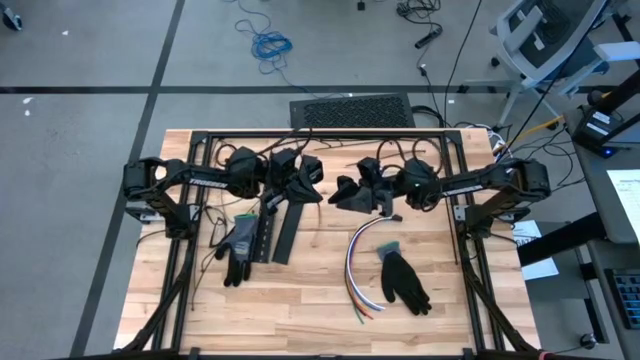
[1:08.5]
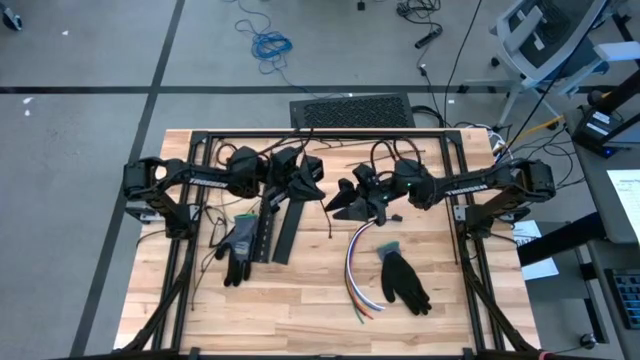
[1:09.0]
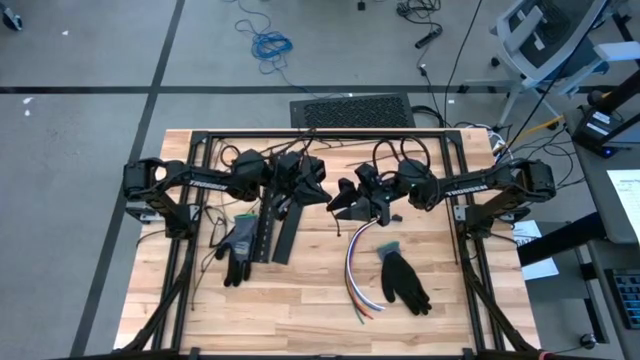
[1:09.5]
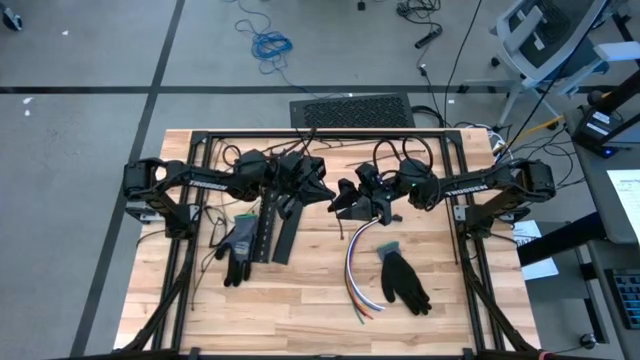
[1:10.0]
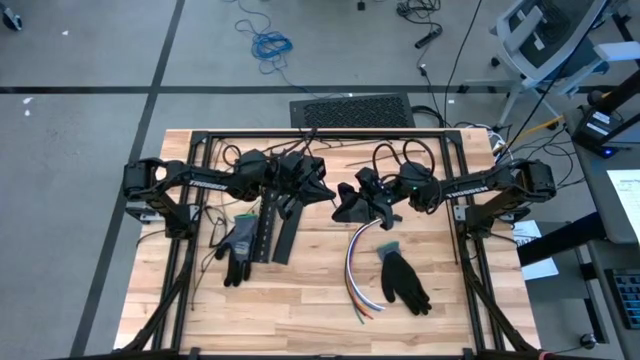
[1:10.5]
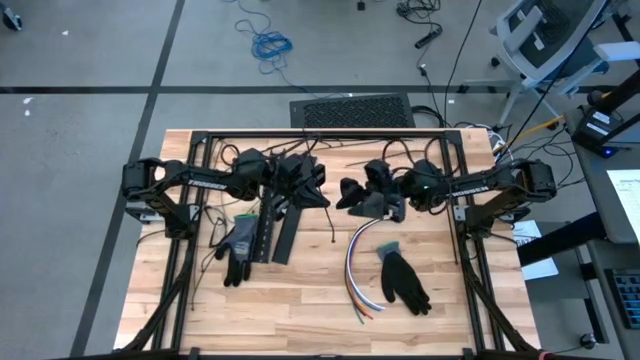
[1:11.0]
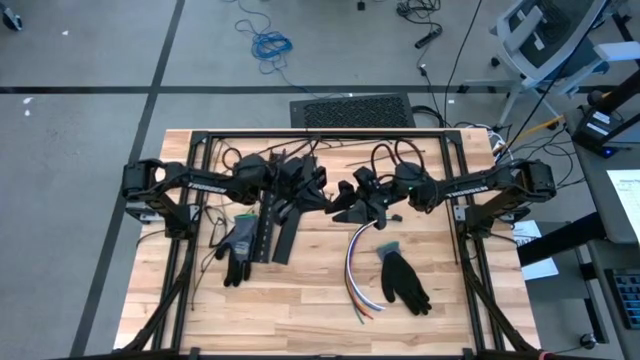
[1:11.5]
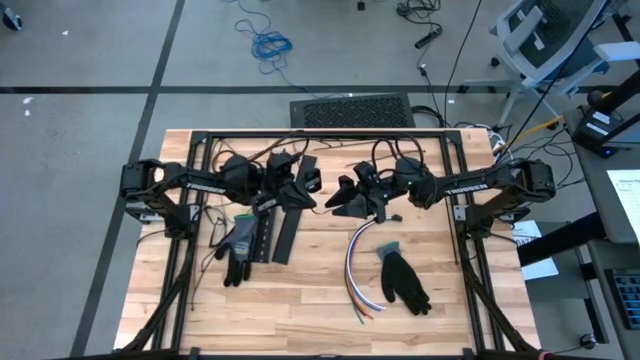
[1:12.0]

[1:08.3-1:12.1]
Task: Ziptie cables
Wrap the cable wires with the black ziptie

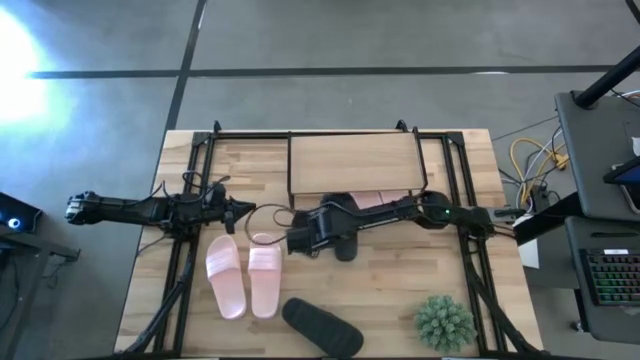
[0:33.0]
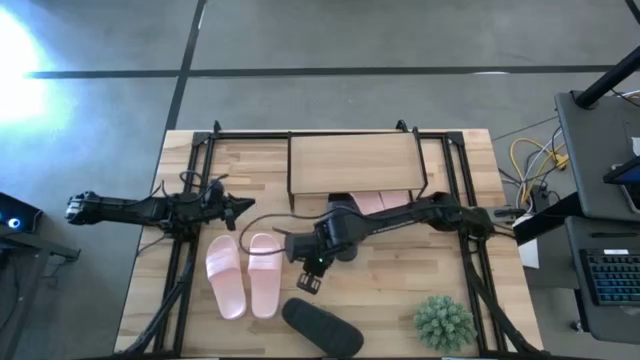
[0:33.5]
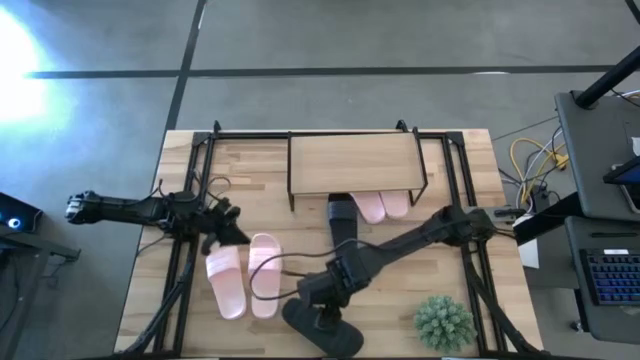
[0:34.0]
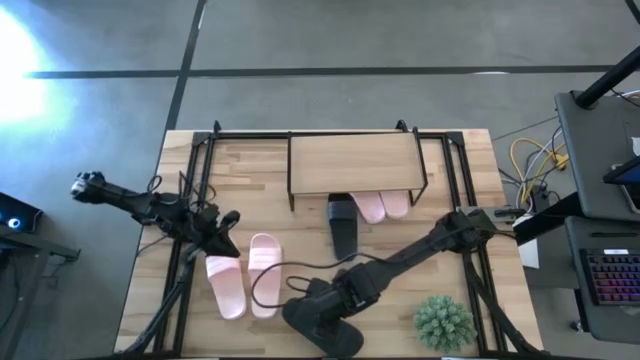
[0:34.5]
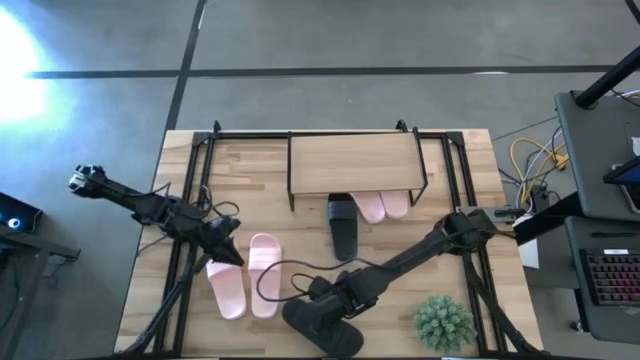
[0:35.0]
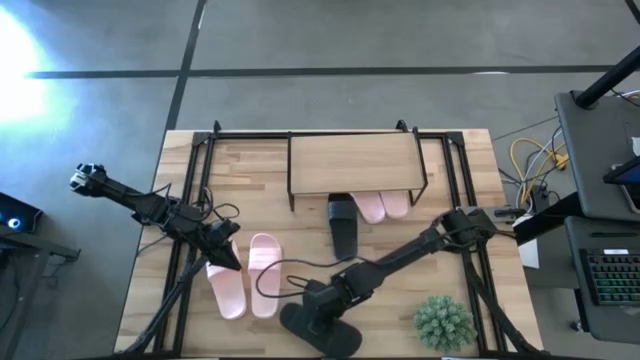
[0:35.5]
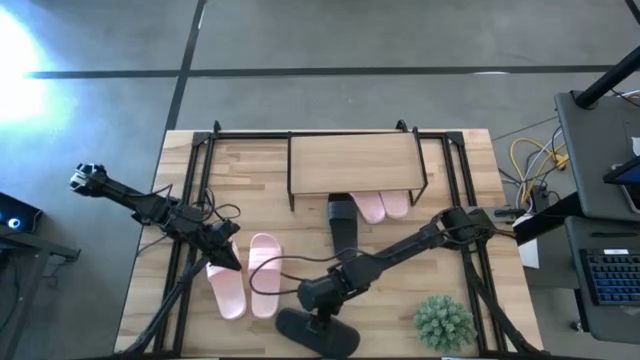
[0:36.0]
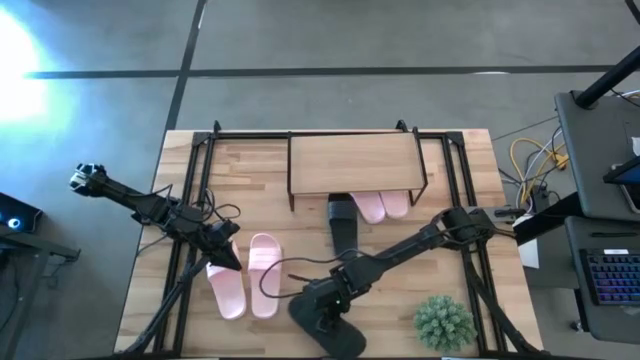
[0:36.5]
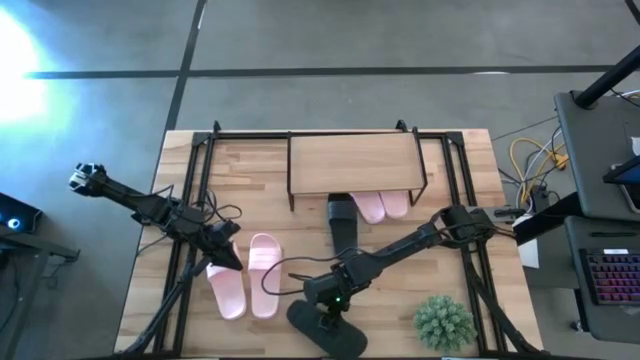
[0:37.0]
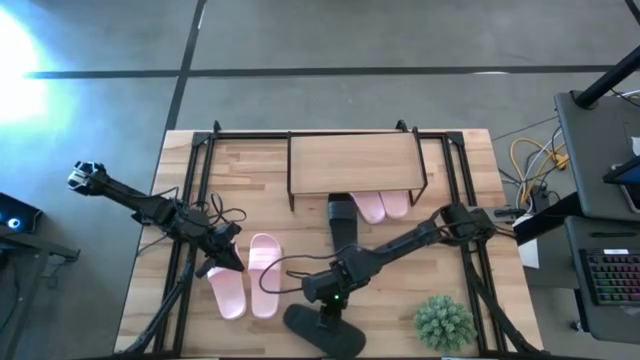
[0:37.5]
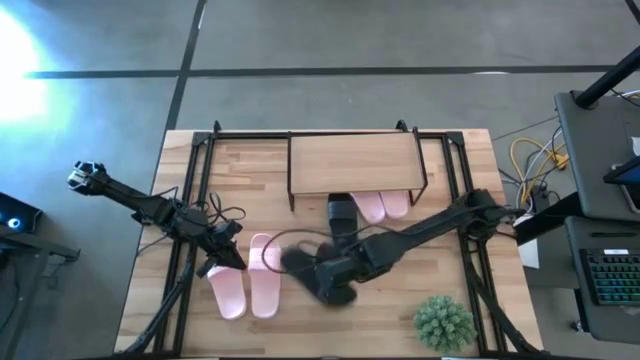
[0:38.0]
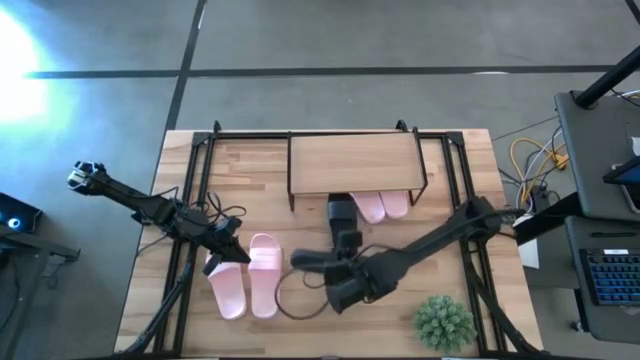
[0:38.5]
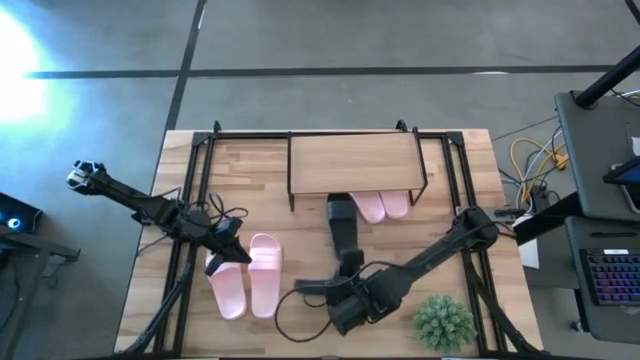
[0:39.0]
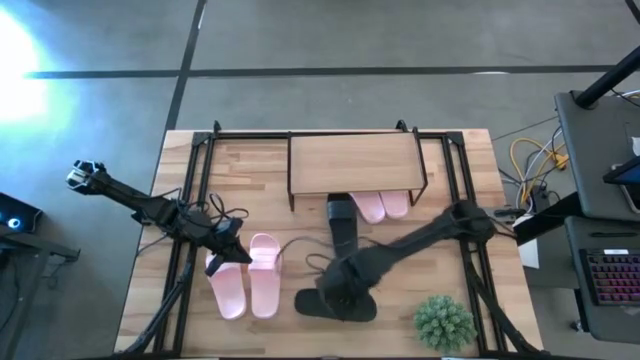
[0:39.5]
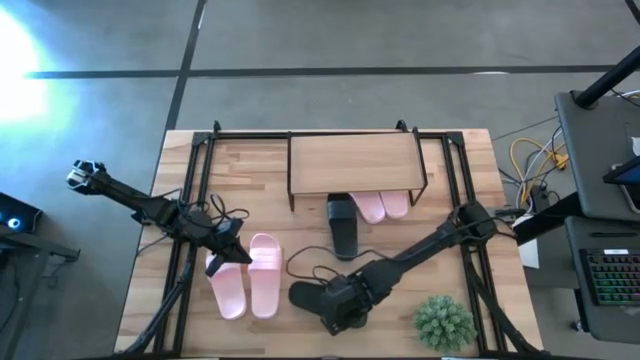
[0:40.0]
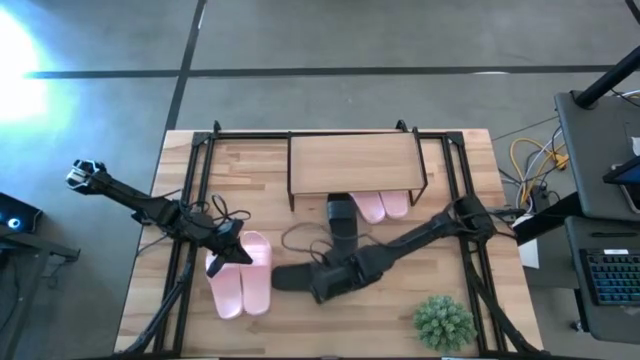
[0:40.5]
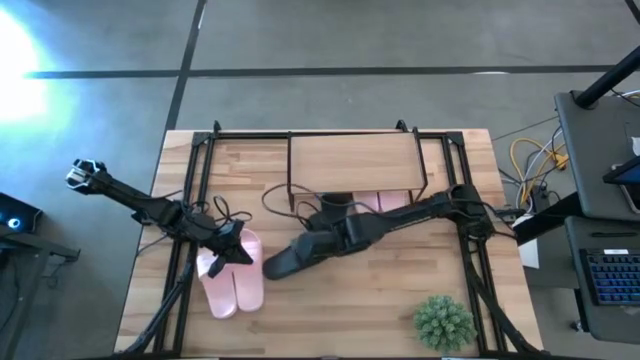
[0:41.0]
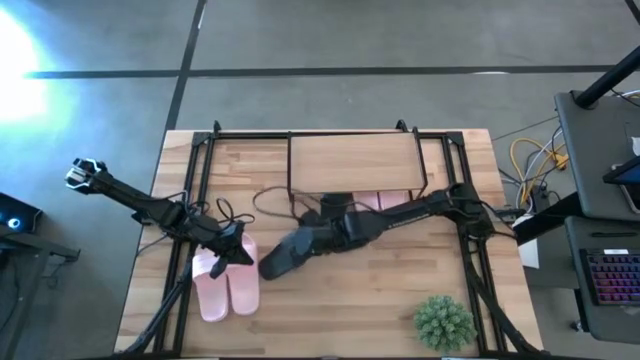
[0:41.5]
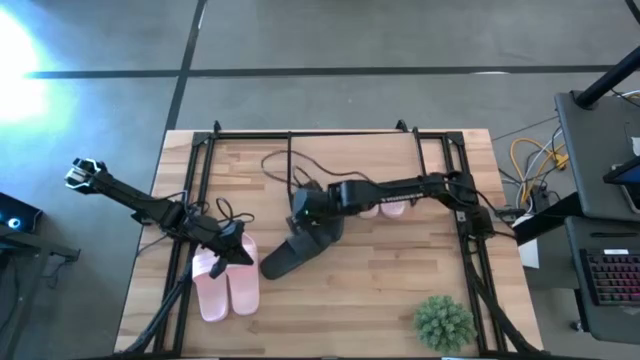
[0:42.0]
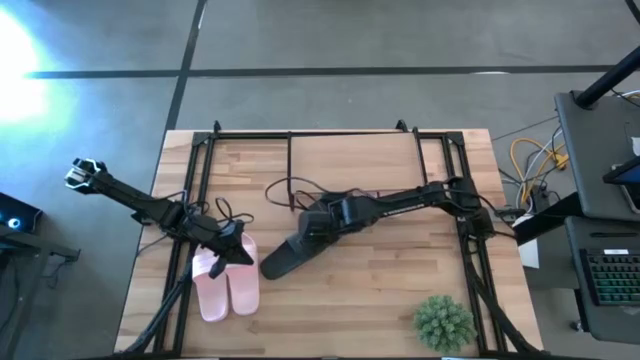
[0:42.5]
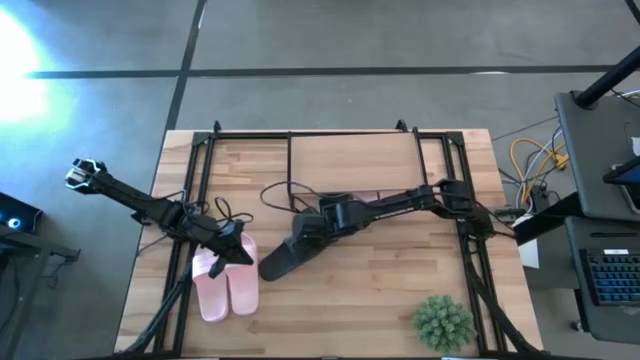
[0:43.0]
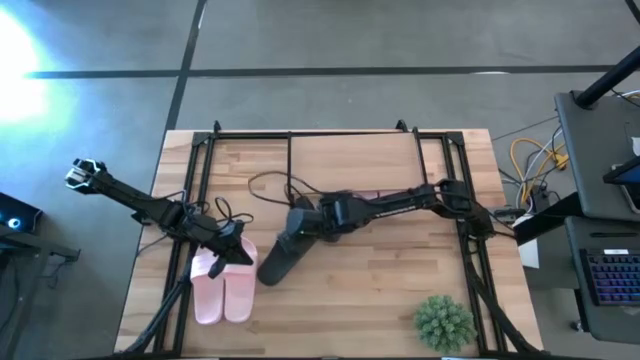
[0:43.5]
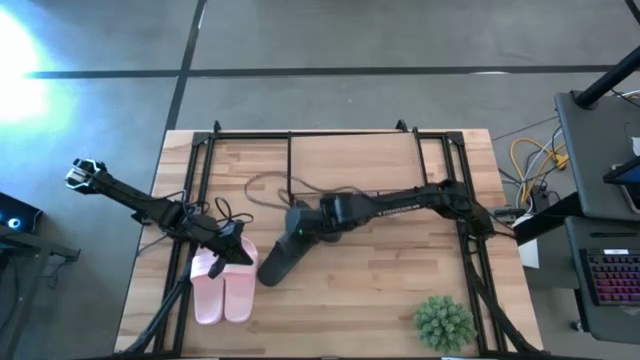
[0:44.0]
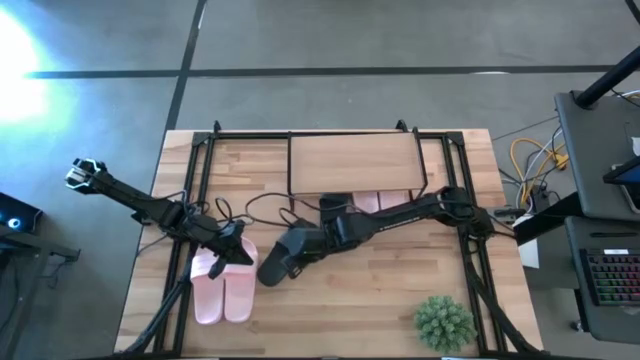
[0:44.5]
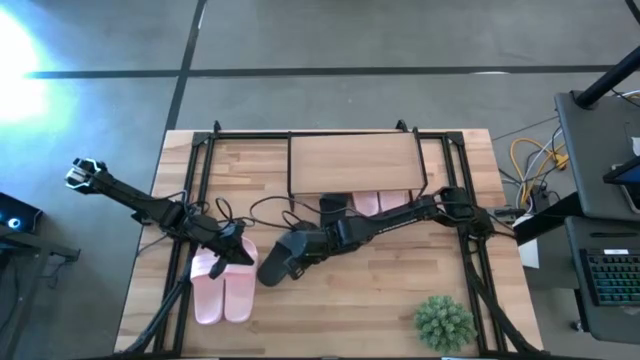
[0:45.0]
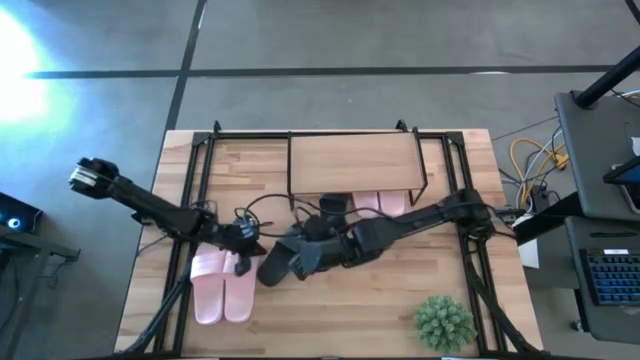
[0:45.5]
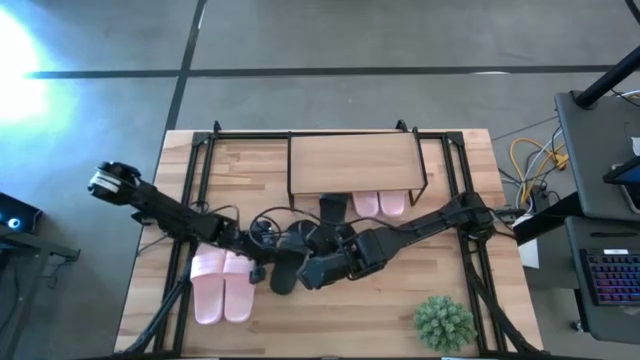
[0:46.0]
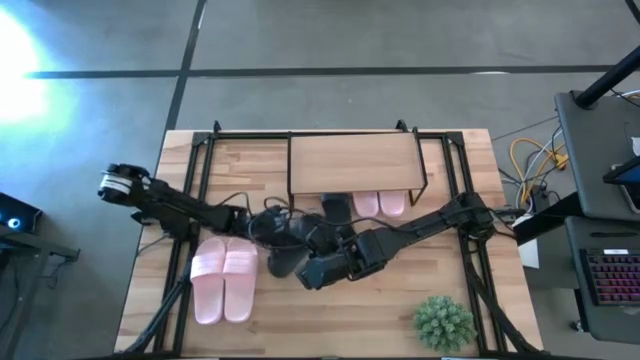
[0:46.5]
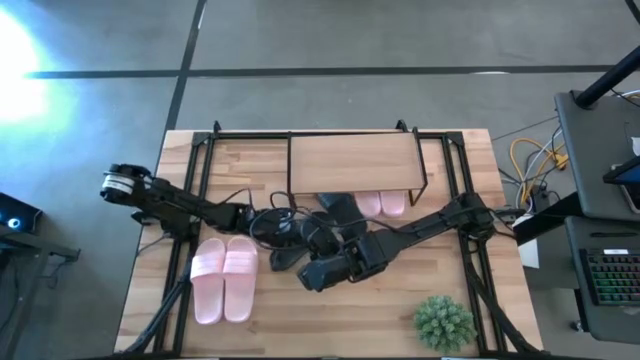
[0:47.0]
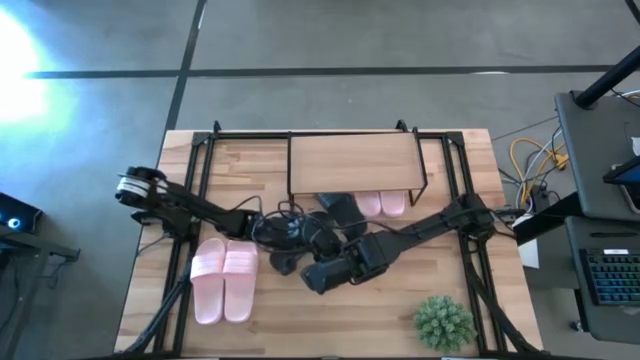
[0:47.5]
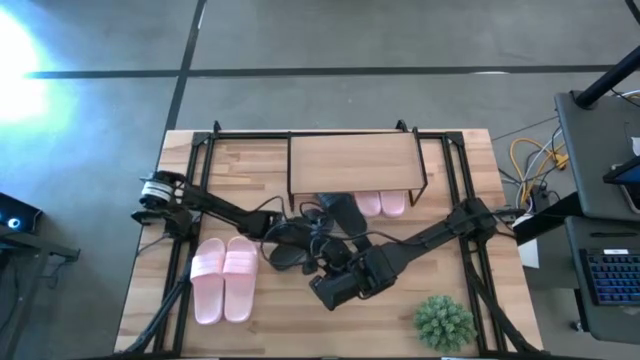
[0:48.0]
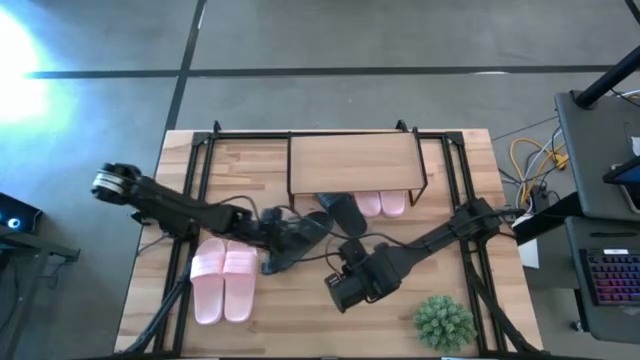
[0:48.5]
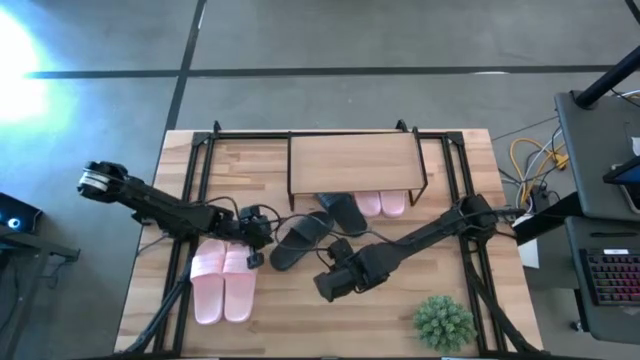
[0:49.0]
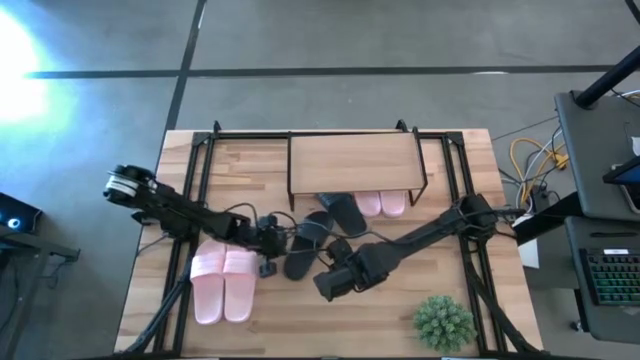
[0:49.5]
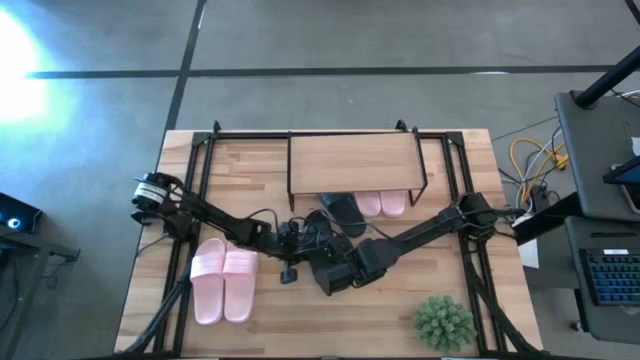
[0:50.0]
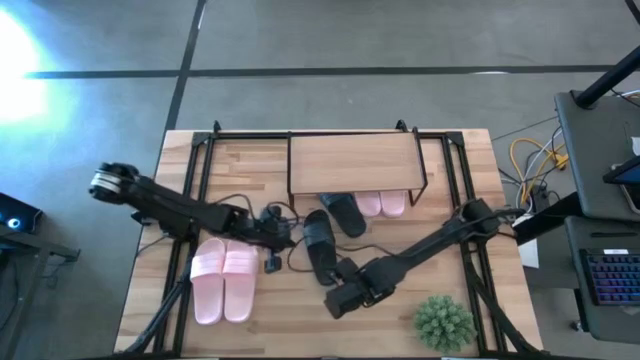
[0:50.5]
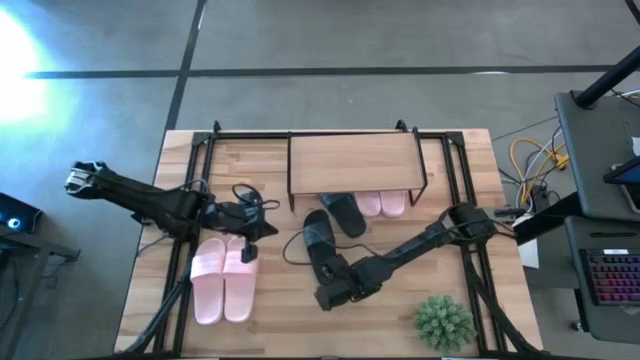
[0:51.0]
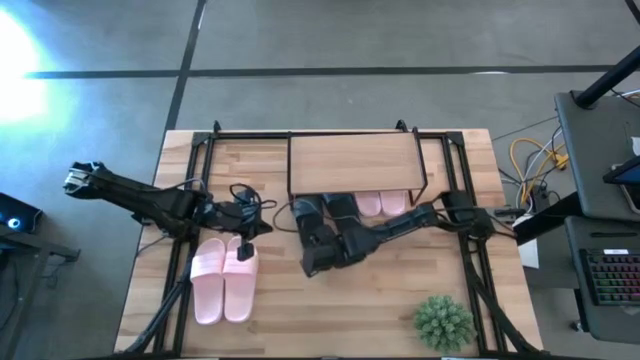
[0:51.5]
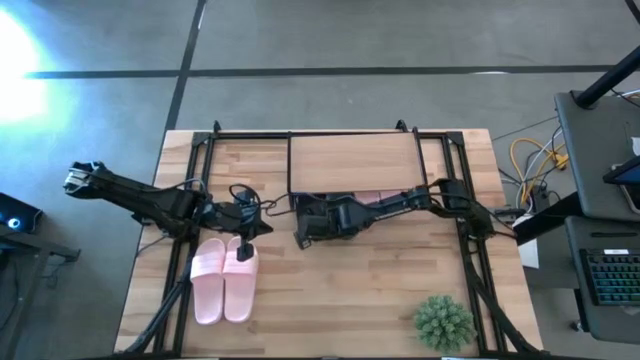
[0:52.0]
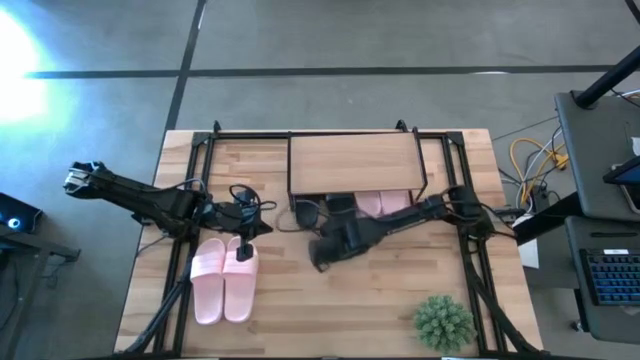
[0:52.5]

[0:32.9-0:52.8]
Task: Pick and place slides into the shelf
Put the black slide under the shelf
